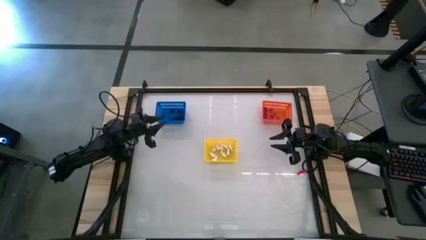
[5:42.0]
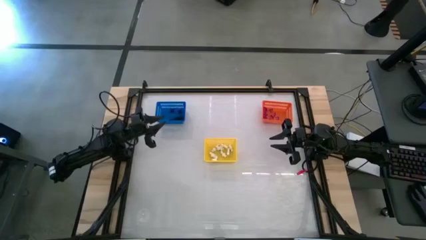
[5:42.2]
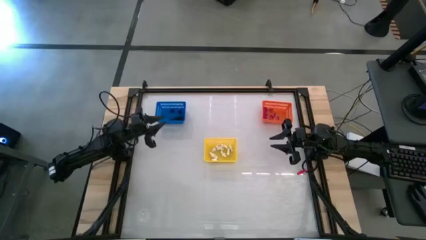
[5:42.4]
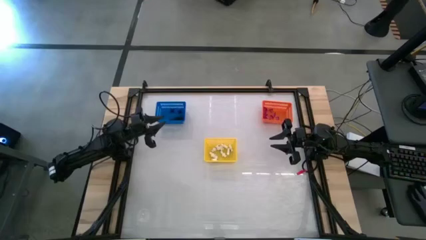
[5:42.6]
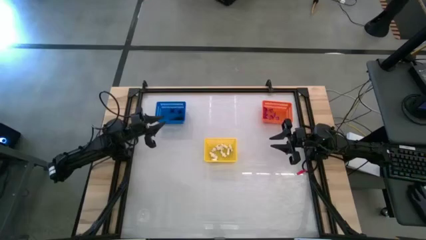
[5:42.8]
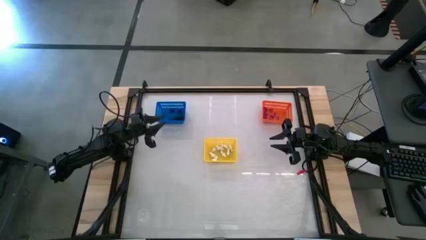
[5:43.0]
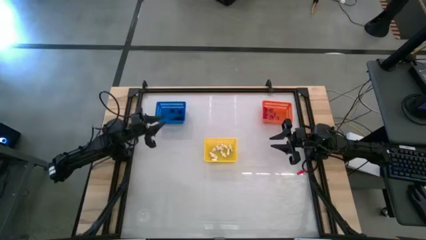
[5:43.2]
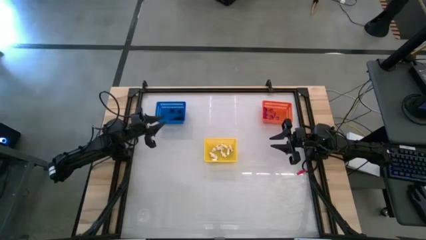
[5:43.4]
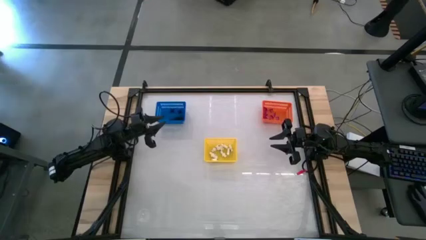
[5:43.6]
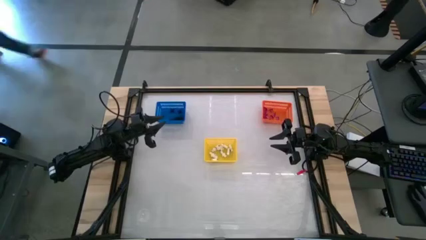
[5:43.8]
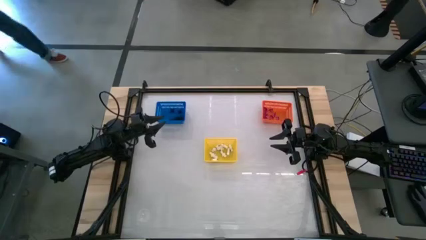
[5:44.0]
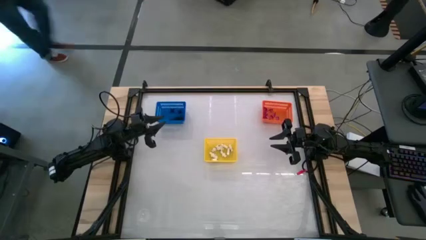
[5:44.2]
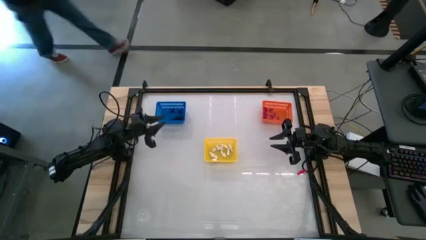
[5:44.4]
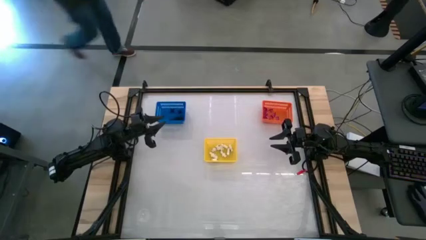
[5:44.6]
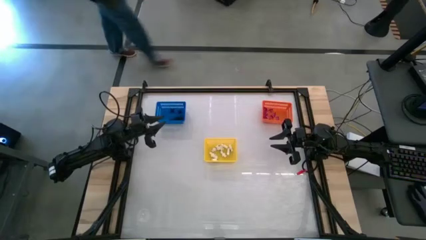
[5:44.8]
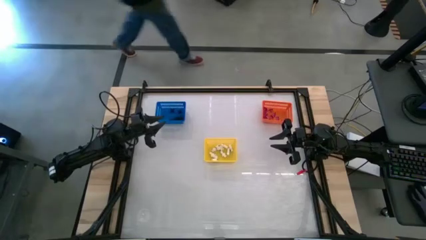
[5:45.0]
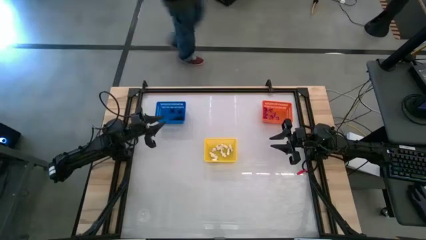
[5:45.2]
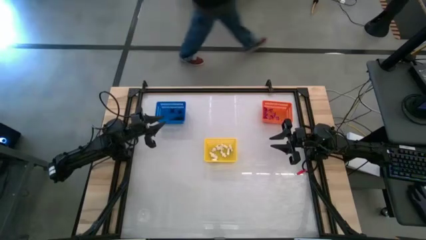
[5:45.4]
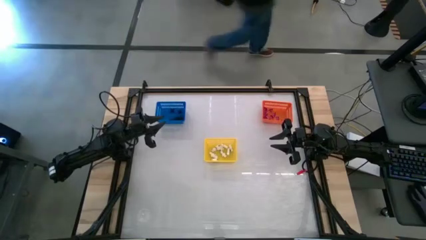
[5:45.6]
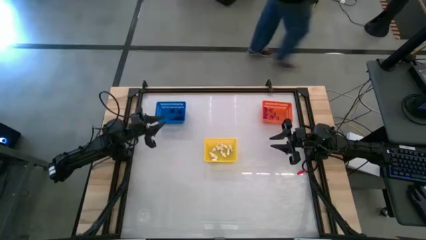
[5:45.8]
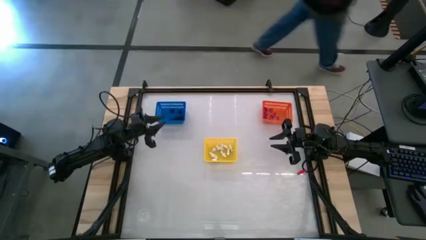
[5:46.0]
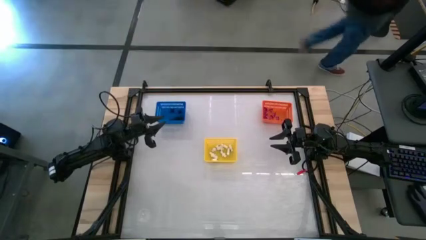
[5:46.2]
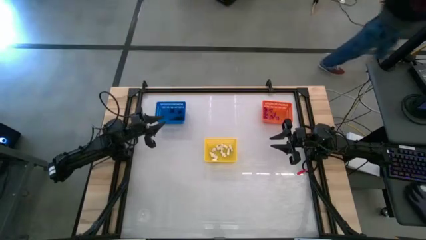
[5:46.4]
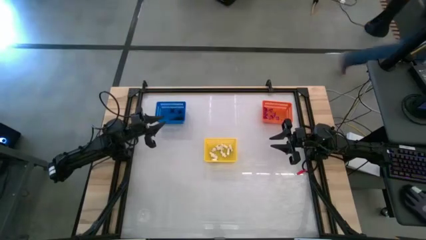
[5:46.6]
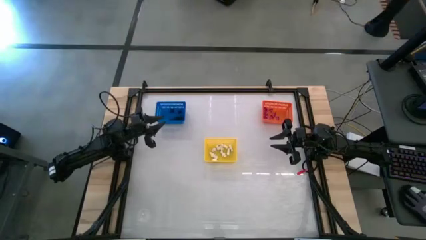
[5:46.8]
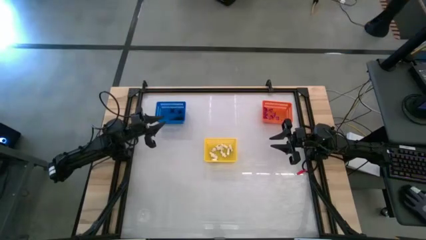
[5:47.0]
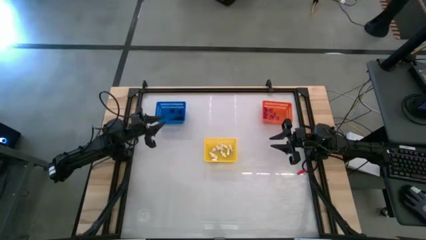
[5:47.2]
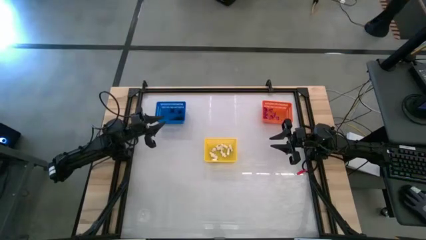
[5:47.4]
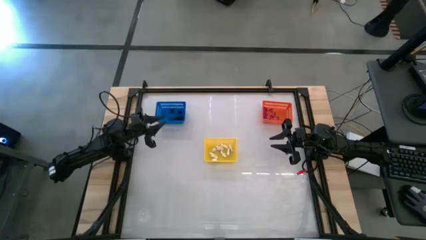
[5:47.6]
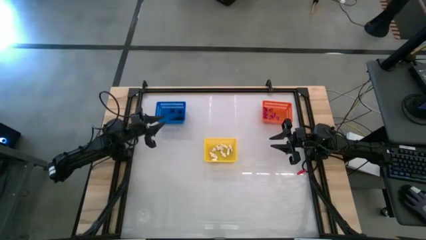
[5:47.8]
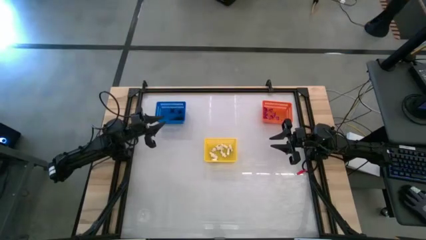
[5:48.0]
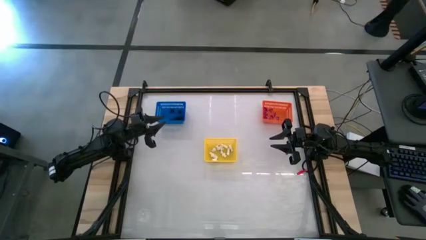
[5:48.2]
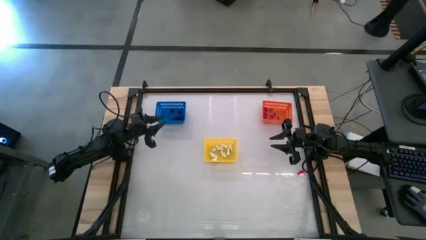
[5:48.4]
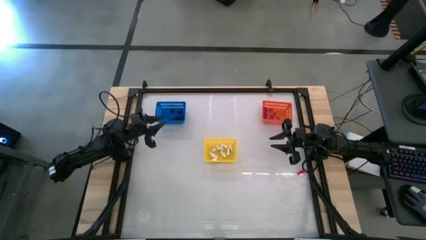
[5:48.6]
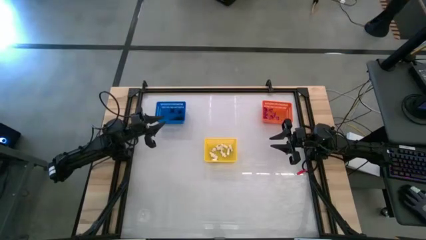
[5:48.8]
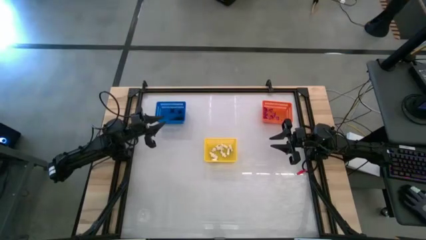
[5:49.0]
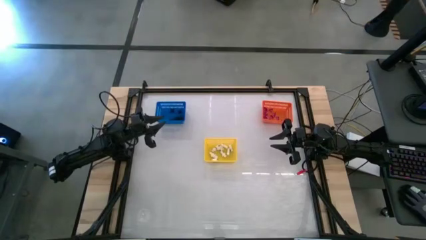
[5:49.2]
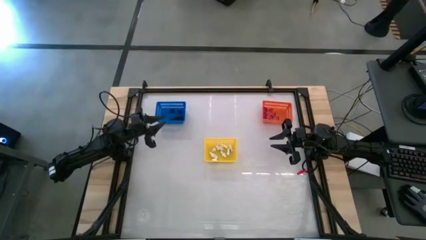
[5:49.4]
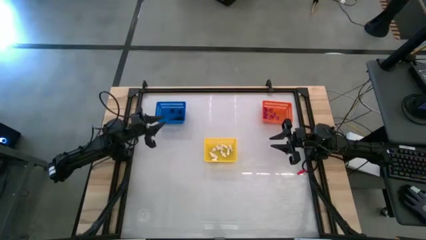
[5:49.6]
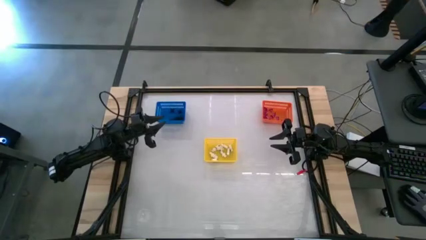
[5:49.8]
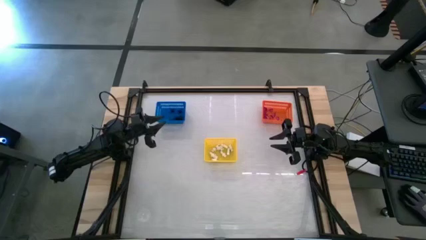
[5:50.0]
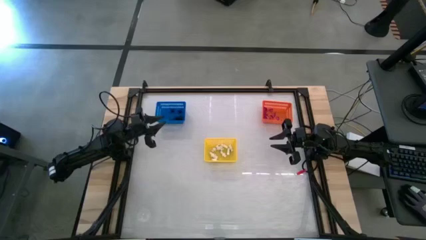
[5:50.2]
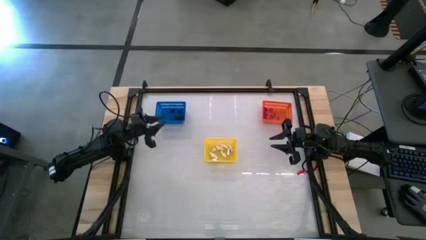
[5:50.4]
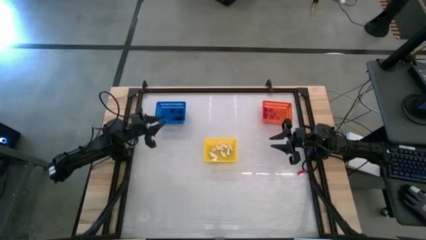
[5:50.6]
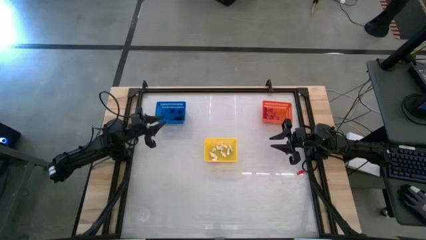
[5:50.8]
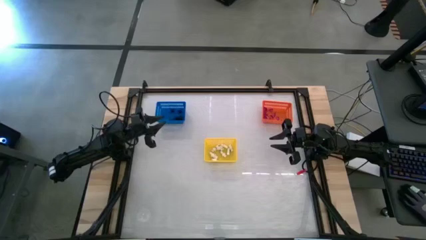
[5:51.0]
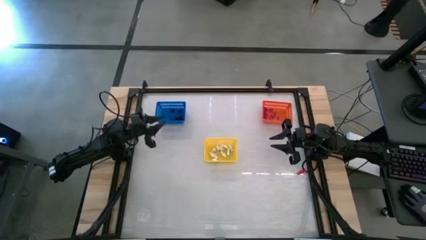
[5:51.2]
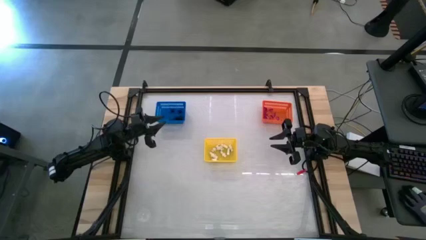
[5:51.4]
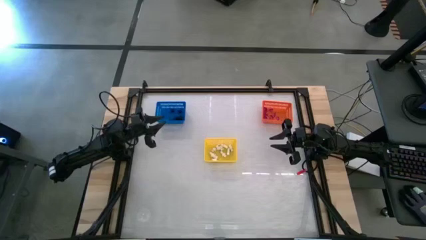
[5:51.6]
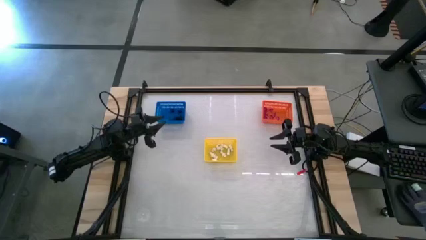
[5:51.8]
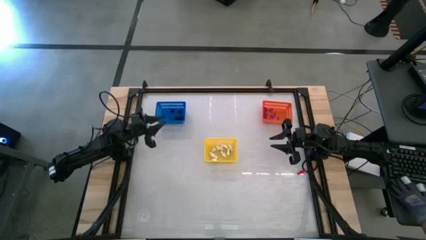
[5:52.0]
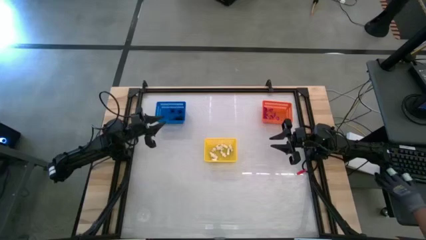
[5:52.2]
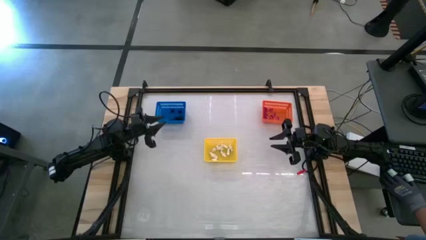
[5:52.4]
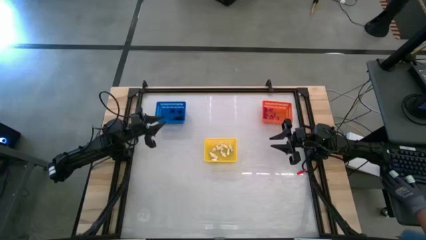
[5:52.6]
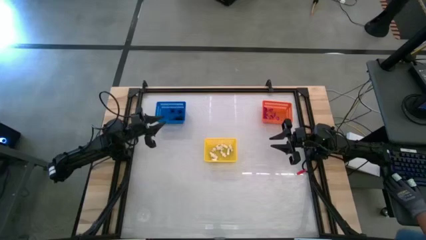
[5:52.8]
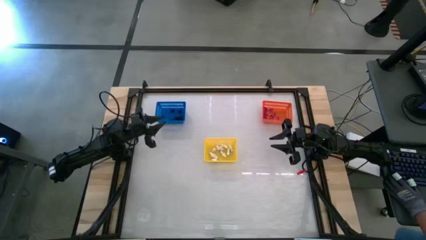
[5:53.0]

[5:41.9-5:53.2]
Task: Sort Halloween decoration
Return to Home Position
